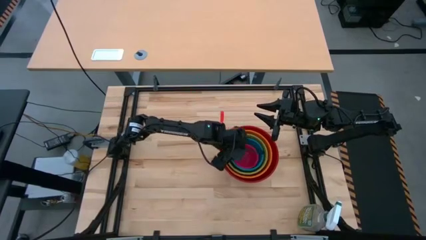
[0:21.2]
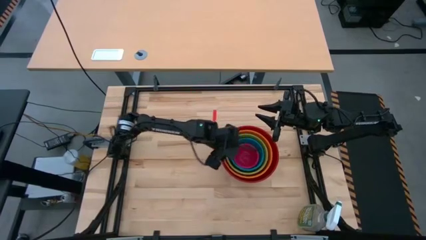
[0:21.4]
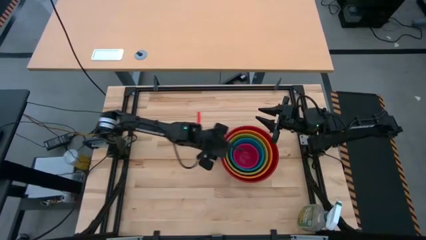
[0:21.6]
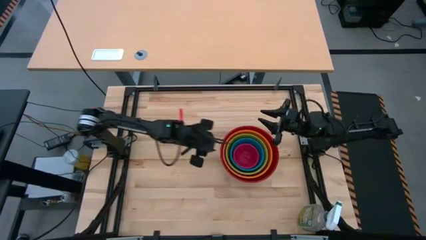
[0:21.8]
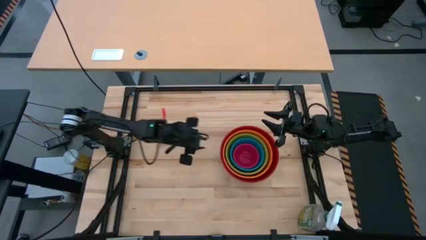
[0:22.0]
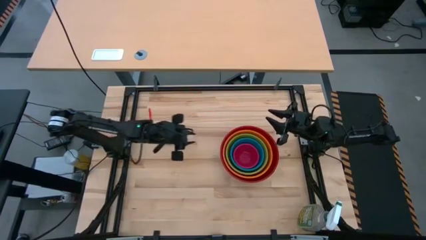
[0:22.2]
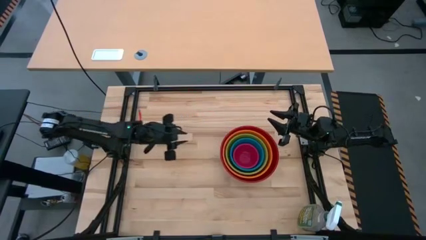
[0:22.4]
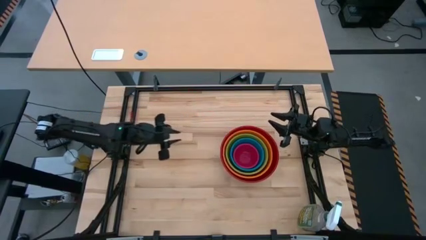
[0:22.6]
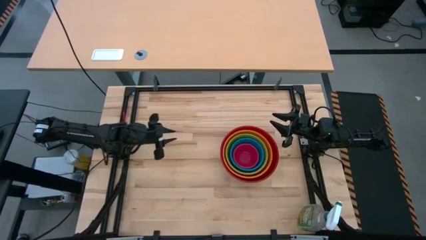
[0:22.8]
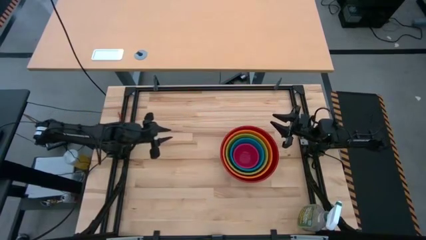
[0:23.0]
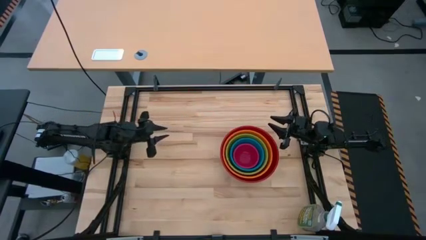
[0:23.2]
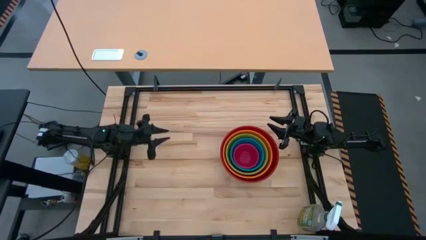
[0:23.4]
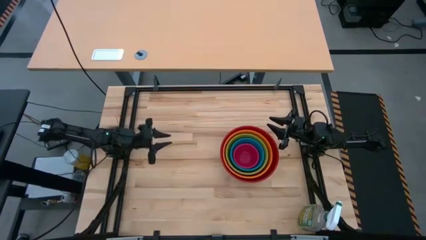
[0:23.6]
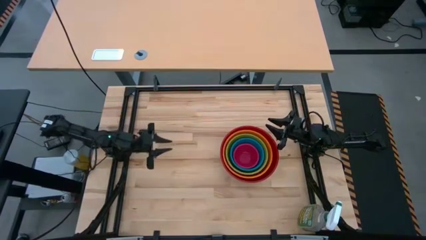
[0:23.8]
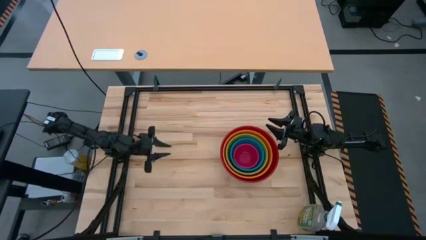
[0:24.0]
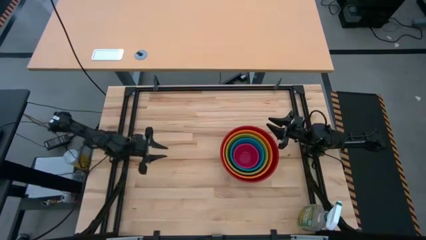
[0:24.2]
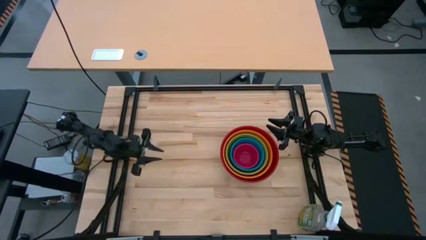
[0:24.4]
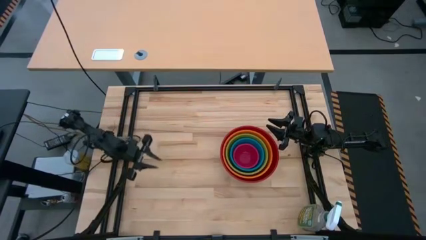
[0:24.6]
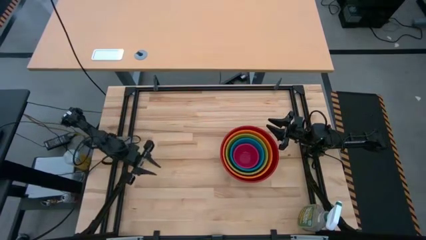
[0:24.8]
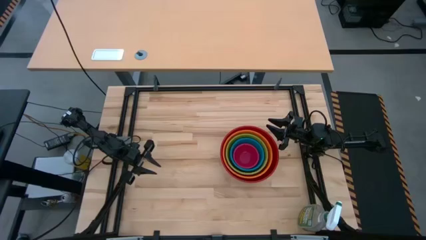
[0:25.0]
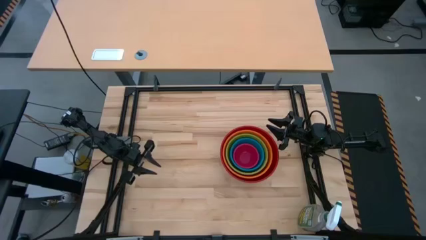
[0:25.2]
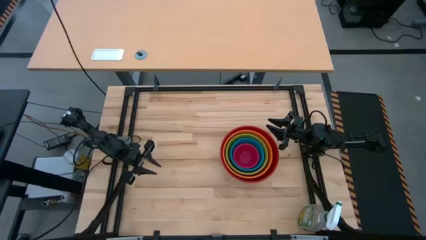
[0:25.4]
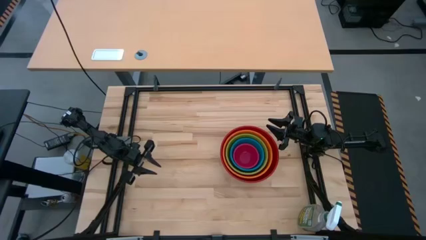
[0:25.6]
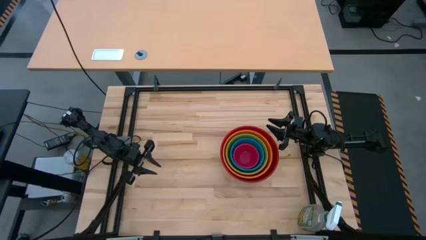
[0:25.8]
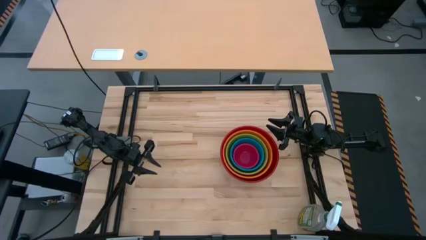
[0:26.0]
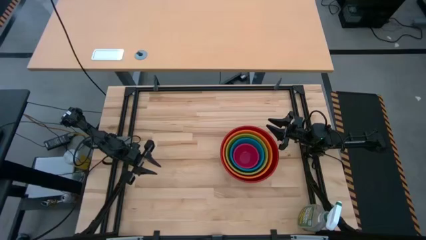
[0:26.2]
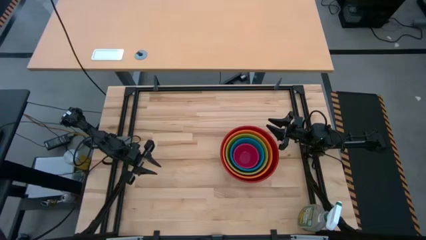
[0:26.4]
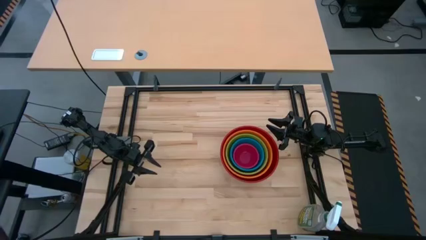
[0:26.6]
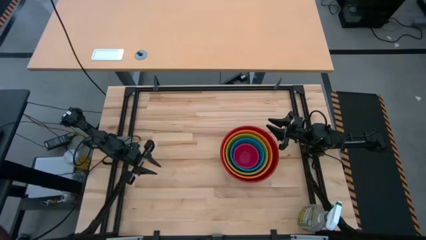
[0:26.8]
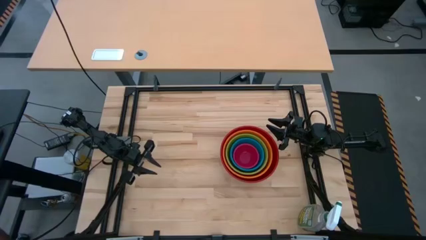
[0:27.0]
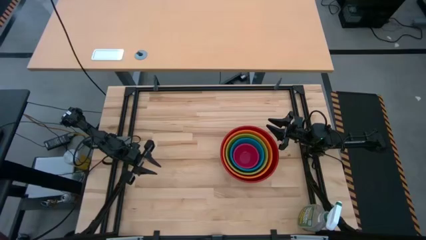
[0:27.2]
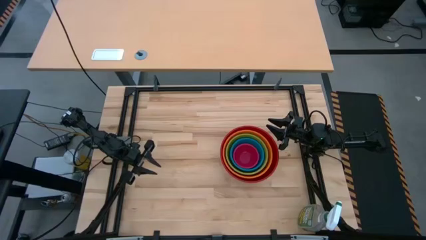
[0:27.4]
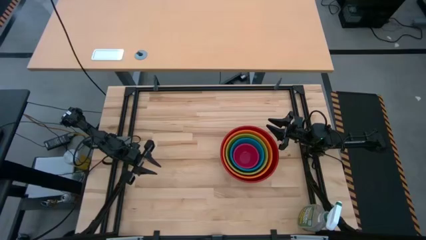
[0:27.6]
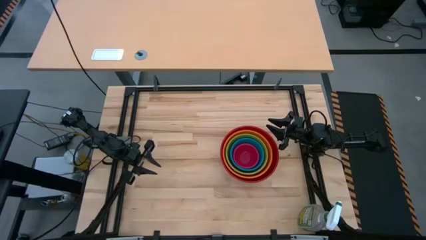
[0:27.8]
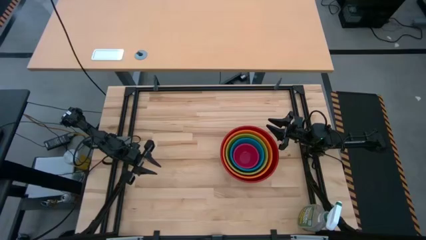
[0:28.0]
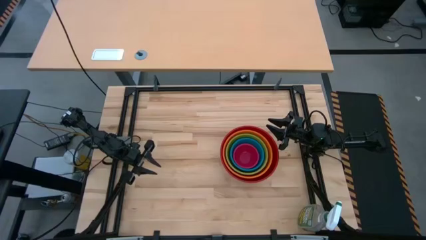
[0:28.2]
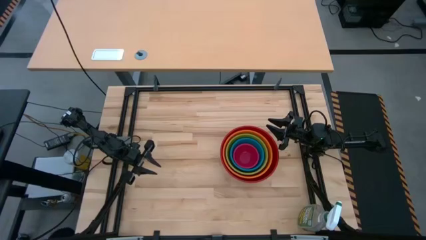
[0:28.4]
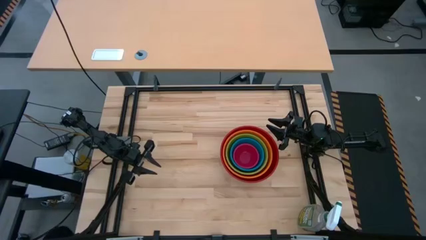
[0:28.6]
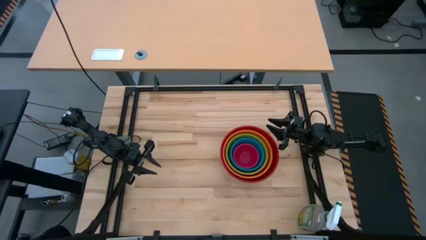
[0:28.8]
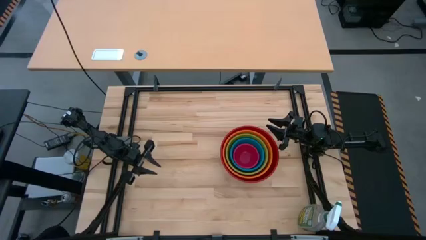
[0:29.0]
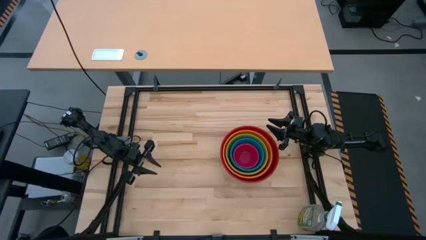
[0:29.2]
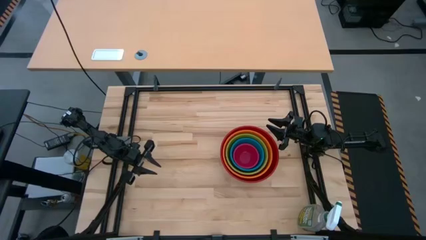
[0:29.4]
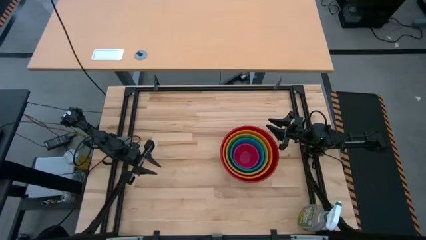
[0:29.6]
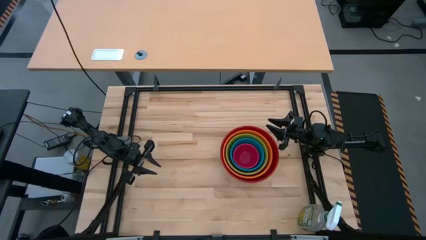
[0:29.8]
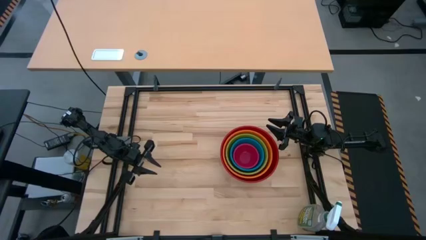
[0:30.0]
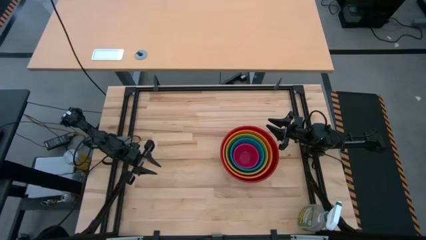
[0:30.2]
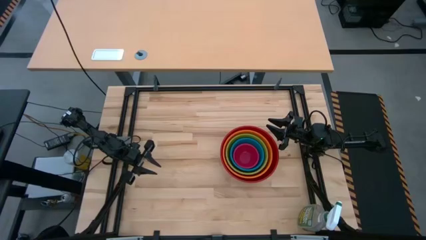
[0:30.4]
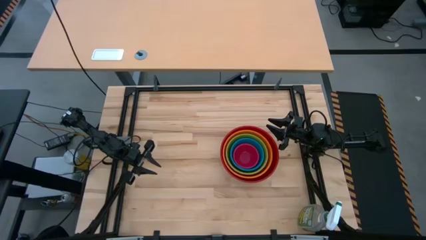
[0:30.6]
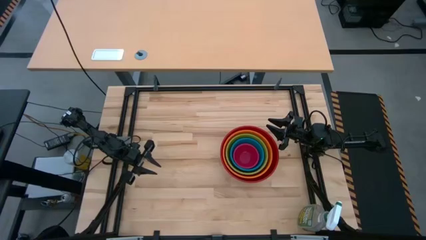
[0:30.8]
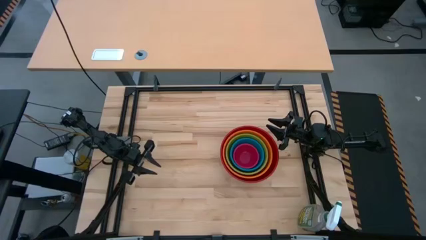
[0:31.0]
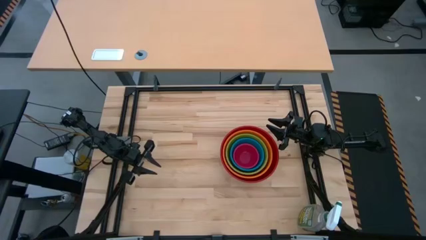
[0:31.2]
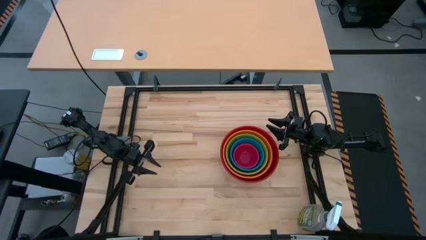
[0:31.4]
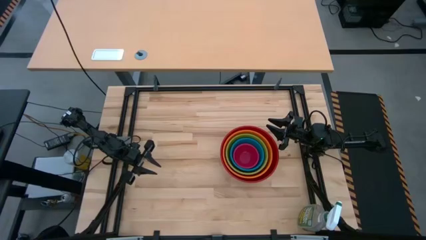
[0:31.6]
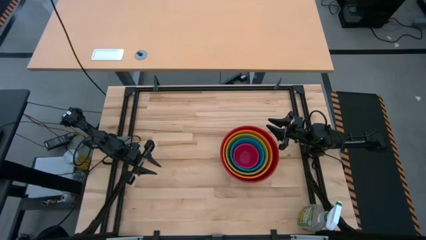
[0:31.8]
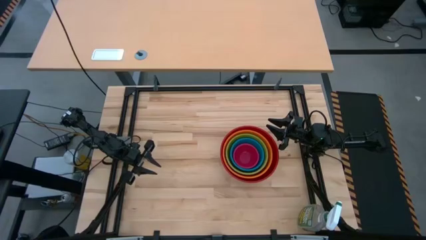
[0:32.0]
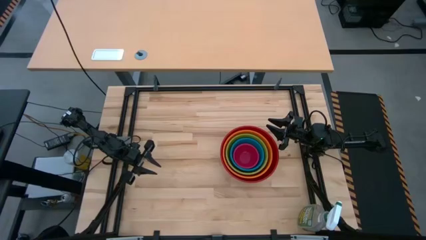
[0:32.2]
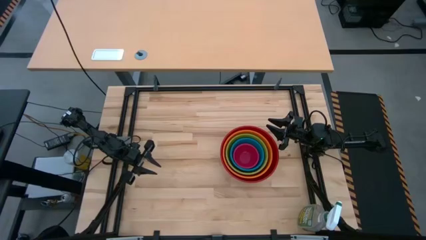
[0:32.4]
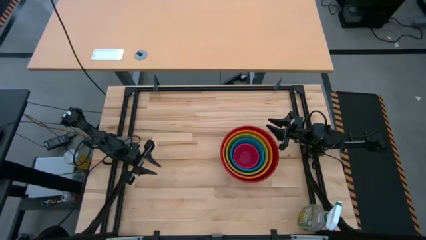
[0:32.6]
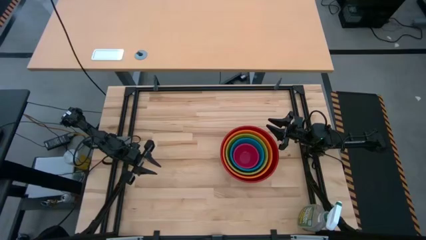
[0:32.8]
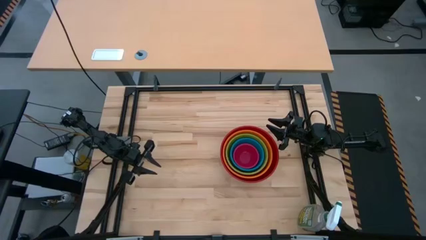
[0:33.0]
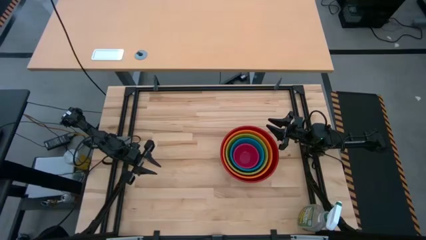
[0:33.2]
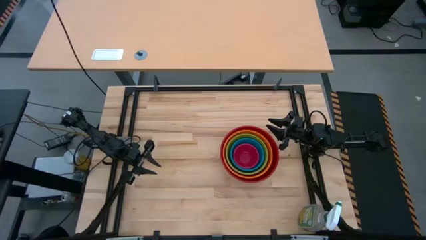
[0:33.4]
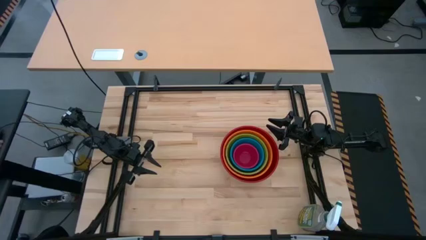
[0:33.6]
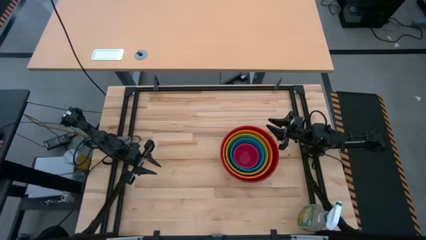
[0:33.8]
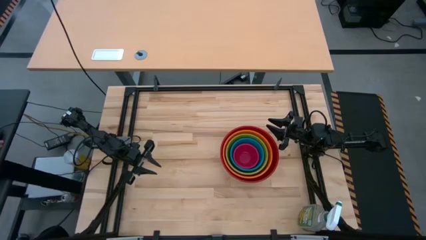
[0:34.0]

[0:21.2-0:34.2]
Return to Home Position
